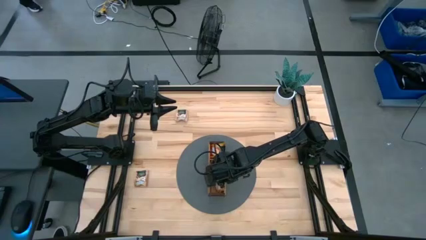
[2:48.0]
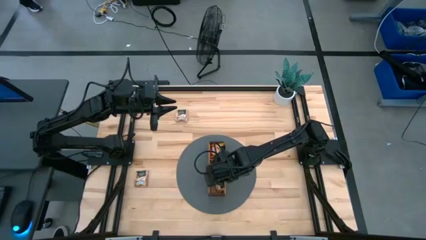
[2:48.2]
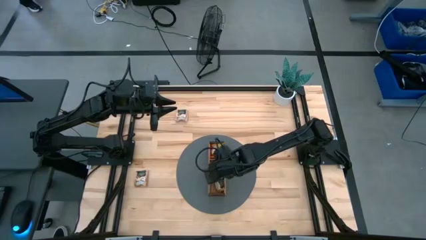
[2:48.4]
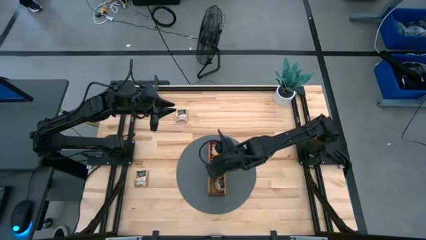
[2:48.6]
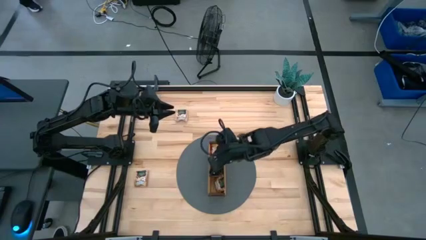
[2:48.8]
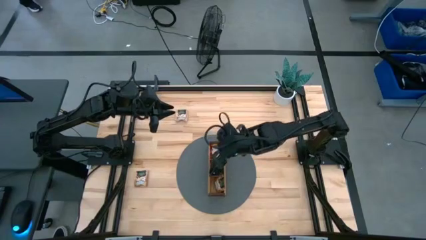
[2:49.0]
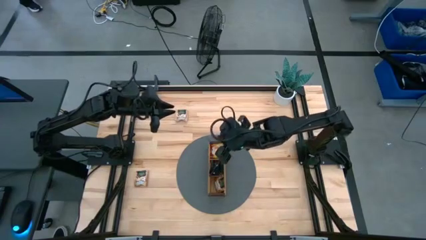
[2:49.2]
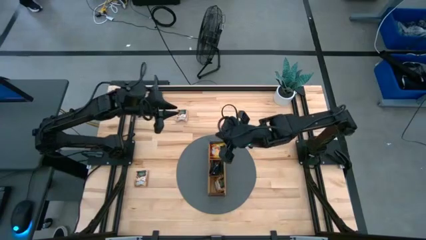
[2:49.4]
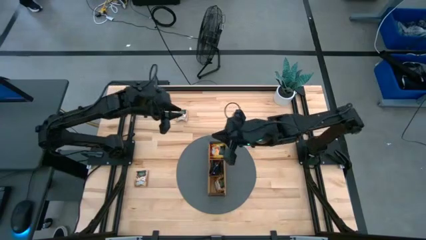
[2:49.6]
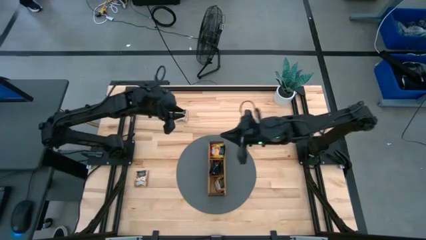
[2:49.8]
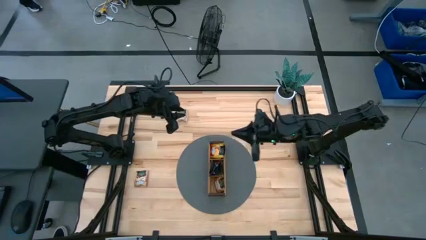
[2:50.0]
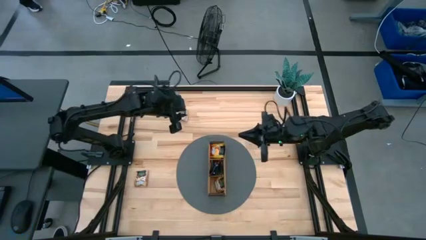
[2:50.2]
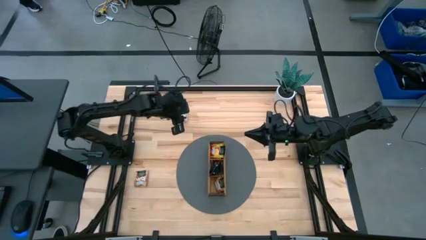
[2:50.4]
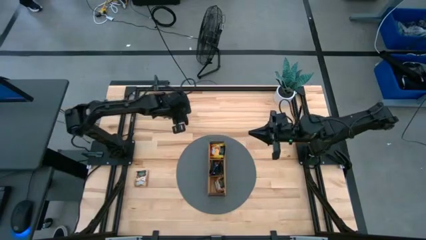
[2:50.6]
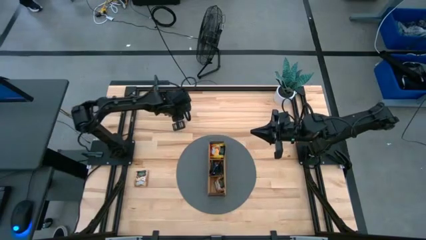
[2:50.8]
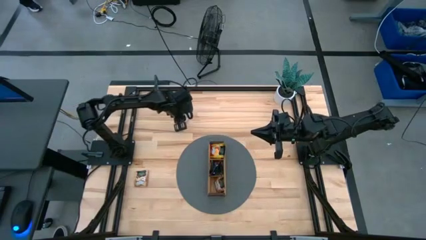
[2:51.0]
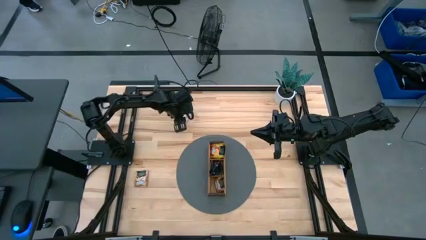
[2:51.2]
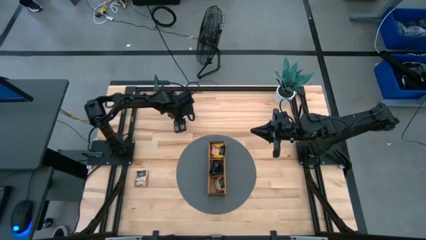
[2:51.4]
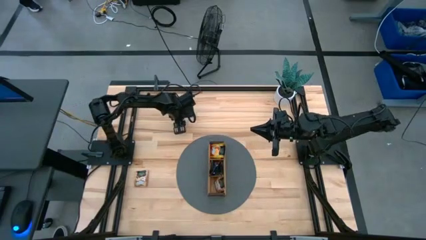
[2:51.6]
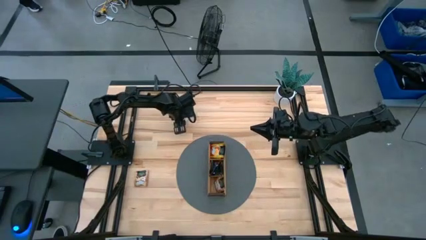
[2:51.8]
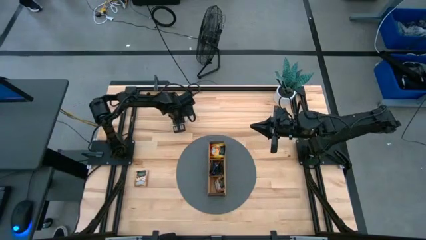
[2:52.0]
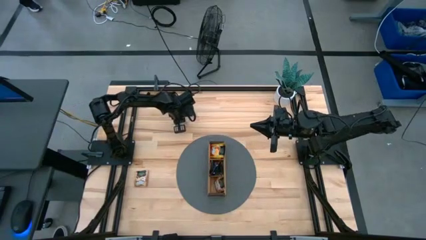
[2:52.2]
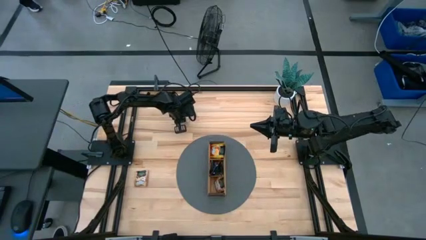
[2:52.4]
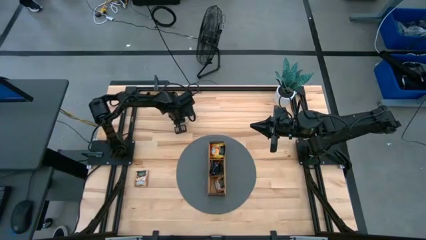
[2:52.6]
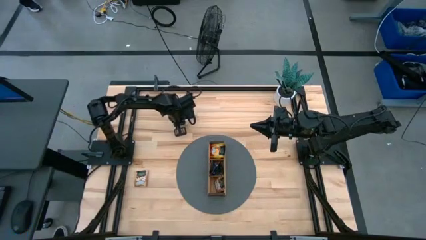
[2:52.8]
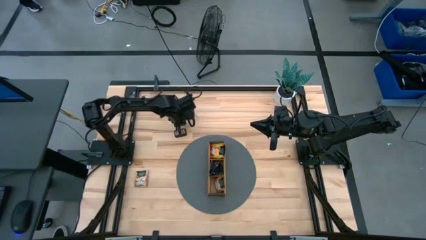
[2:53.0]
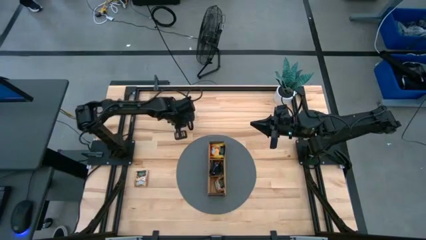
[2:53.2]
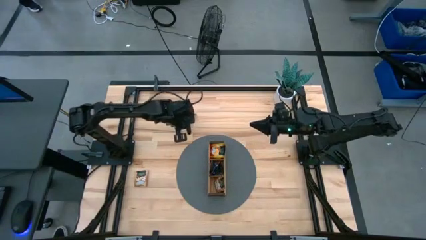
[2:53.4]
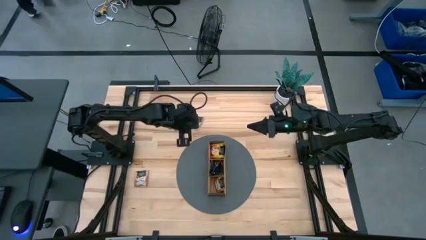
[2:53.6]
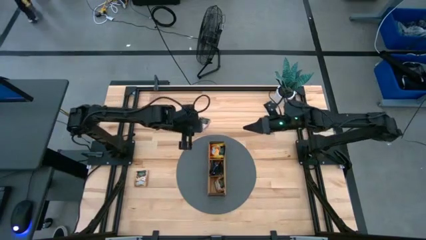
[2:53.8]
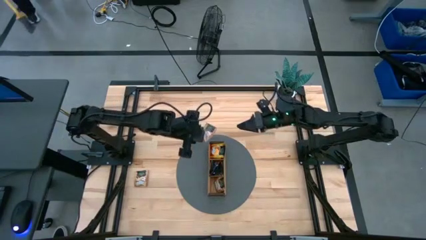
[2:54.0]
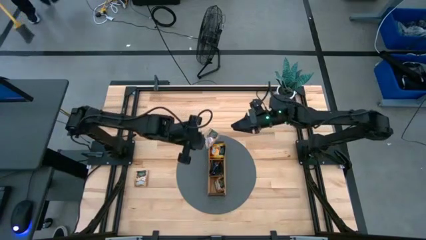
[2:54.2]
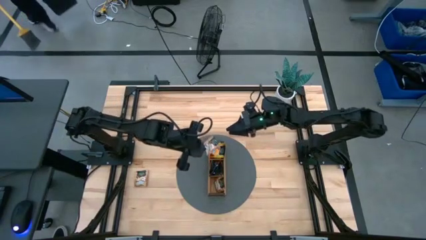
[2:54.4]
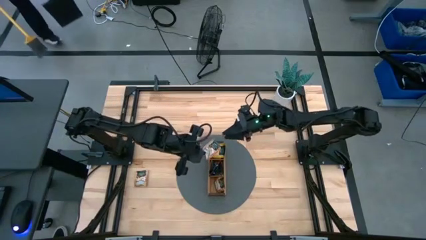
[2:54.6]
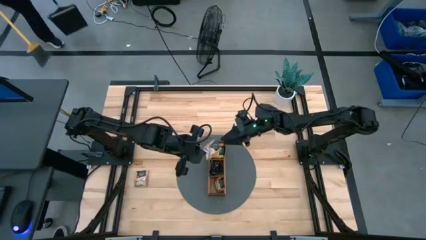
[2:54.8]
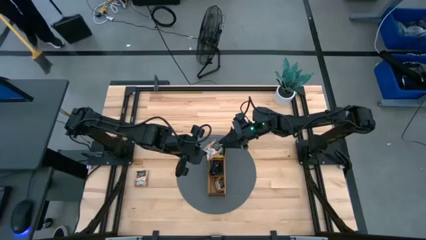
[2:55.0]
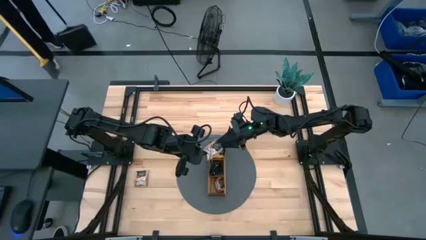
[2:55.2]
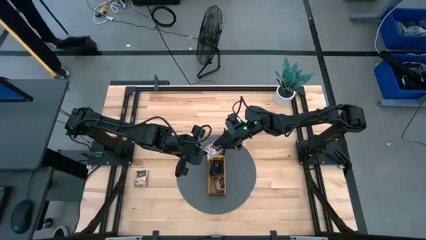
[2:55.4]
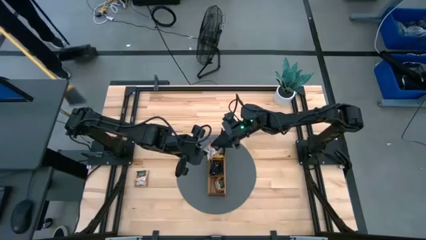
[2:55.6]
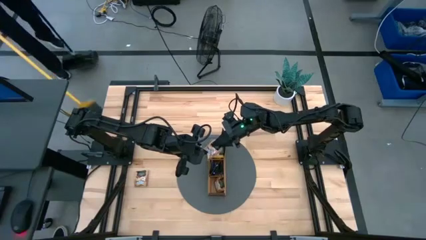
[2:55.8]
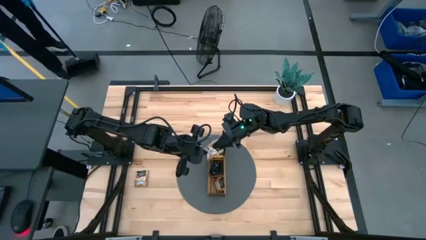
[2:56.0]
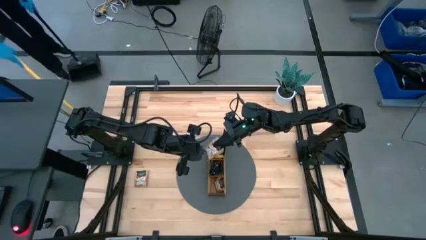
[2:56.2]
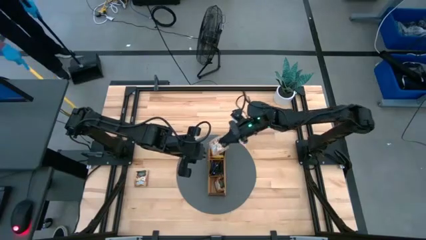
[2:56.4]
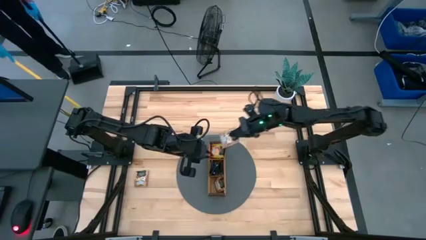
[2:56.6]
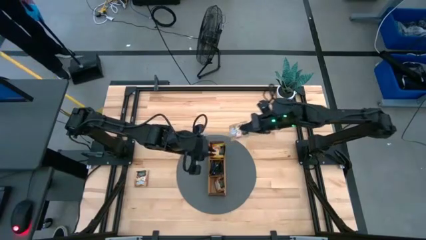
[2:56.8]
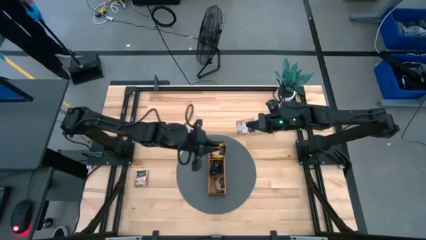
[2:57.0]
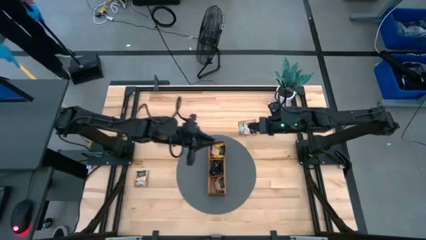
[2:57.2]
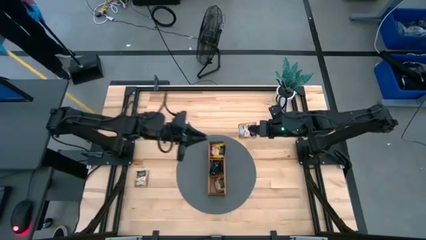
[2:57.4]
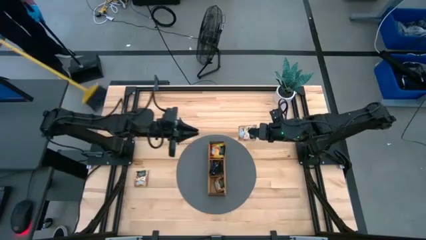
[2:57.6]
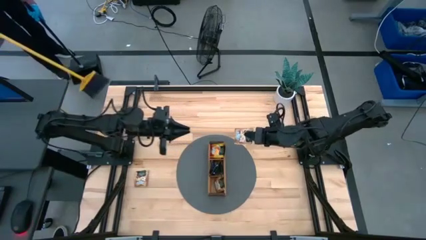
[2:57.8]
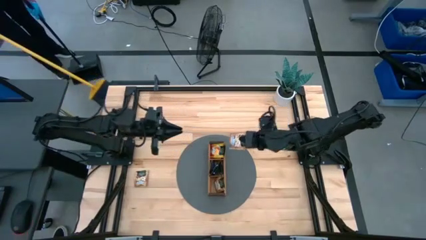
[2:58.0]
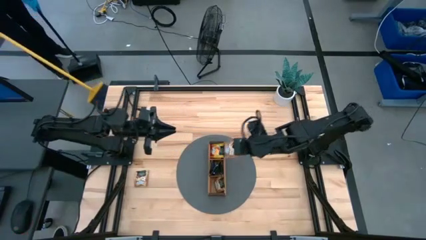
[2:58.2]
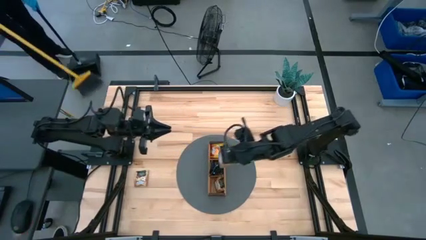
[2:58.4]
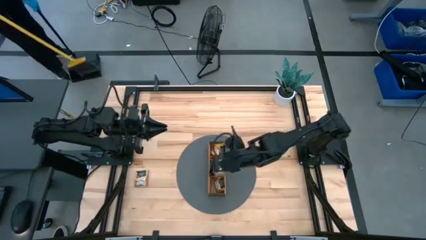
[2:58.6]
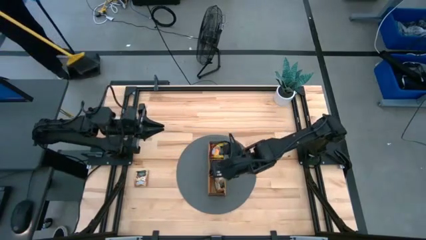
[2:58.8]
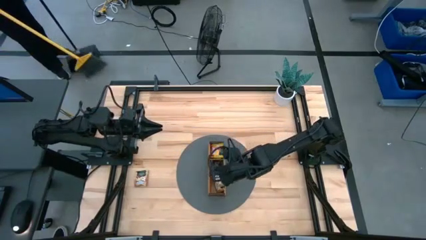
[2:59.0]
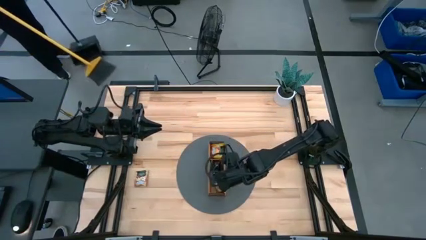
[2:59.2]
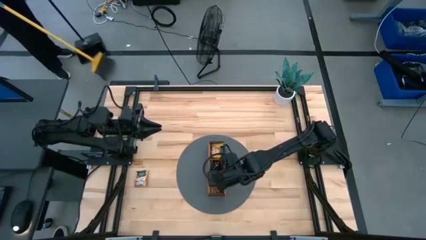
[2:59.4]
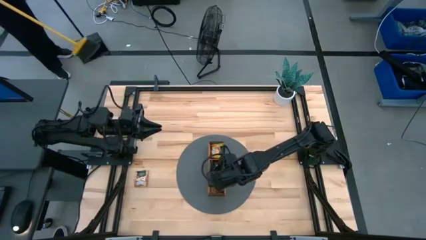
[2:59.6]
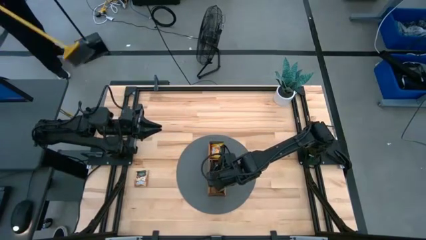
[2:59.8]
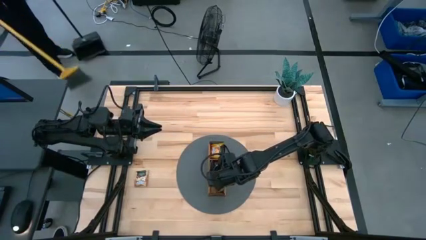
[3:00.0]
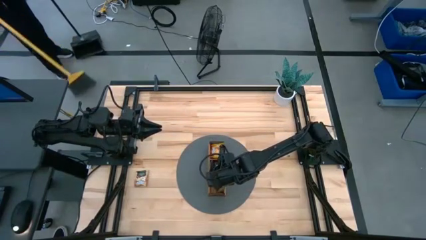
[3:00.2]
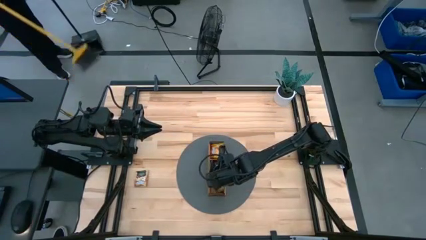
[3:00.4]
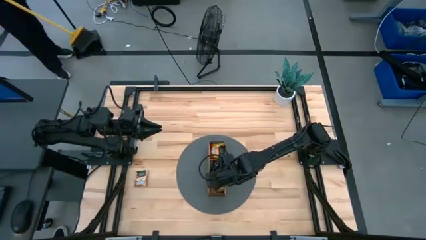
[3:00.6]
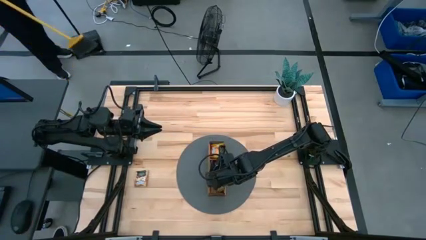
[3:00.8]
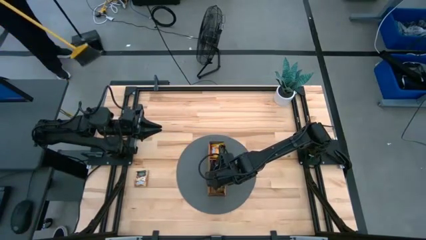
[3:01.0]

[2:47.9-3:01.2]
Task: Pick & Place Tea
Put the brown tea bag into the bottom section of the wooden organizer

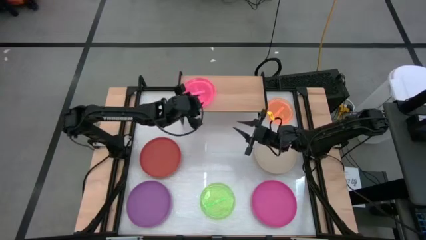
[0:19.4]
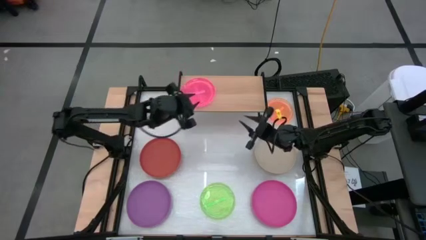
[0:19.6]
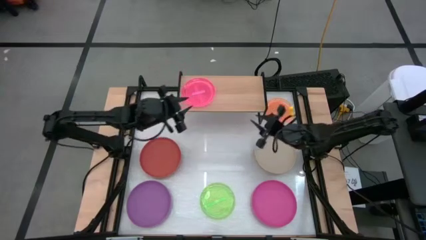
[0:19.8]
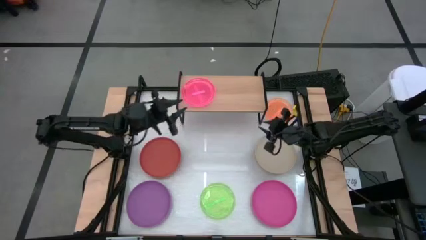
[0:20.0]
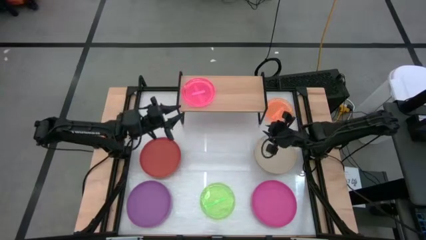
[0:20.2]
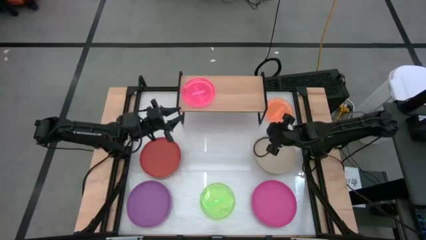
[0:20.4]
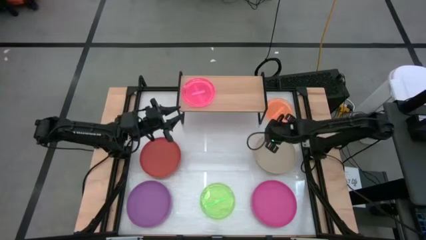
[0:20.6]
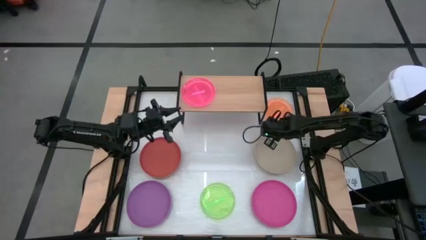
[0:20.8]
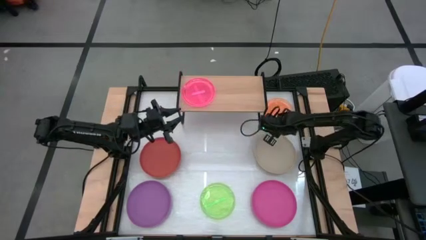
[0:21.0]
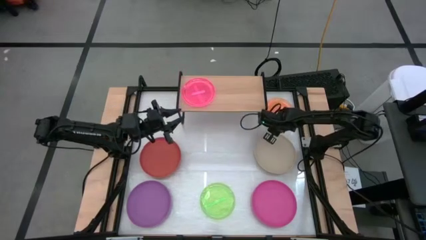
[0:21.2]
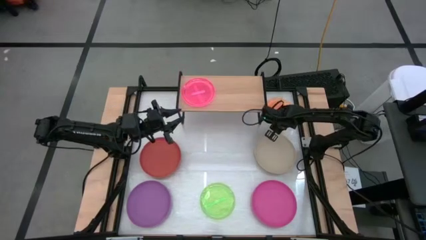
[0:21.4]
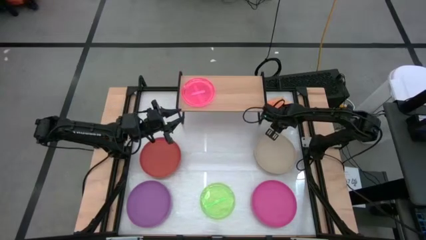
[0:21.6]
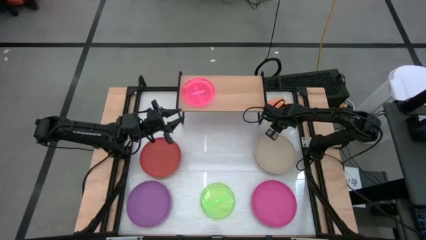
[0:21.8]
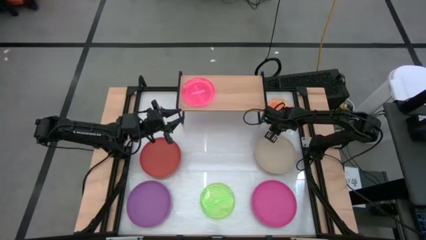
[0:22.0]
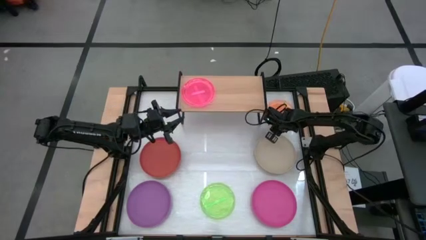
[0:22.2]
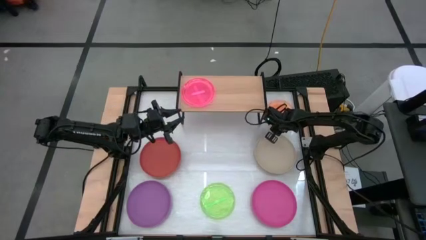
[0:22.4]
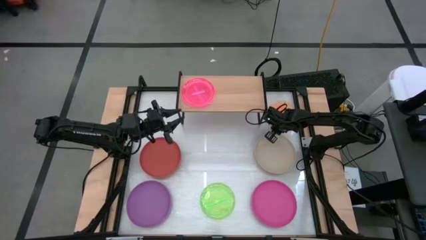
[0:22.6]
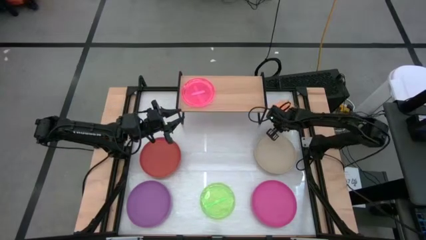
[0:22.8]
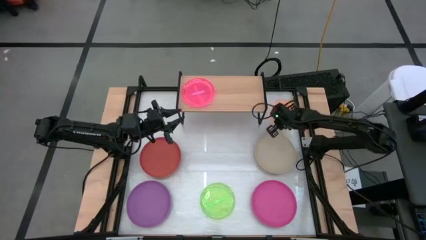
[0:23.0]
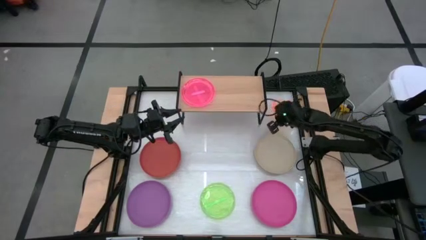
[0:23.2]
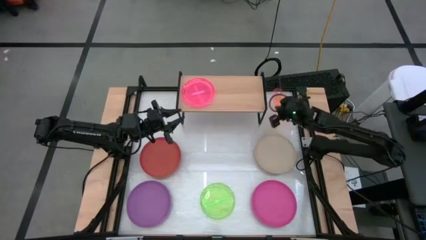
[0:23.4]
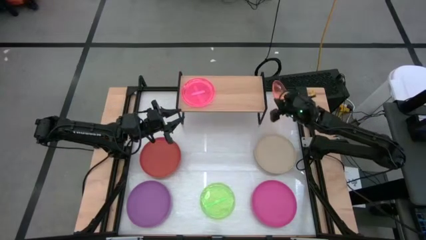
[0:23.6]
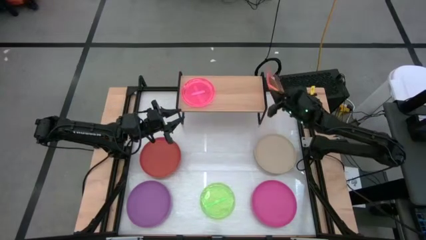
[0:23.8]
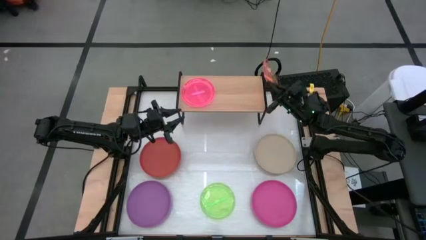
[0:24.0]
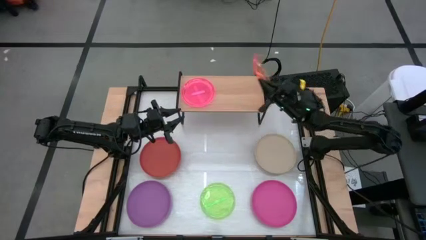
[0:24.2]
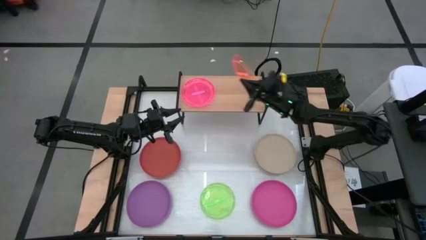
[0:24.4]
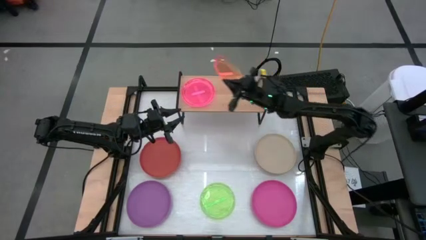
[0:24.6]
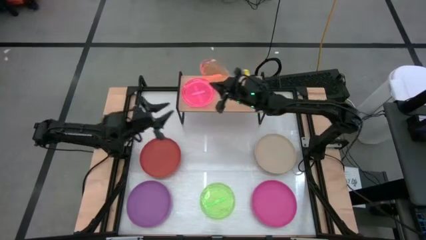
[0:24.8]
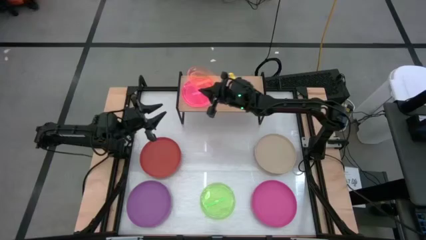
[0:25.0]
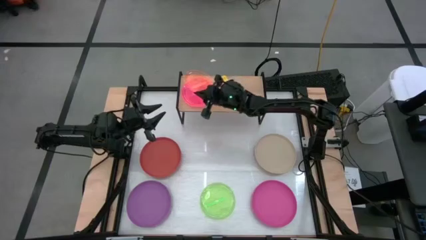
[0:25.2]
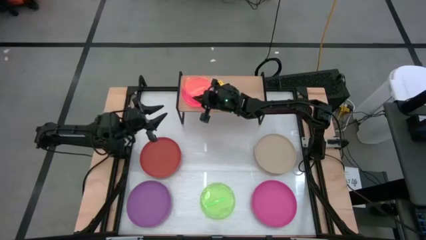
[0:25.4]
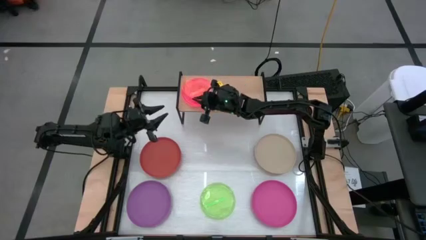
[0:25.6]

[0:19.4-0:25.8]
Task: Place and stack plates onto a shelf
Stack the small orange plate on top of the small pink plate on the shelf
